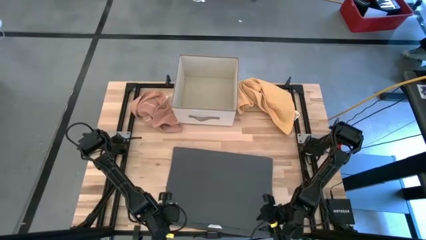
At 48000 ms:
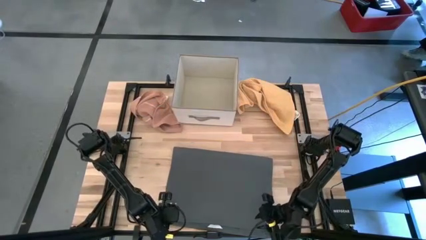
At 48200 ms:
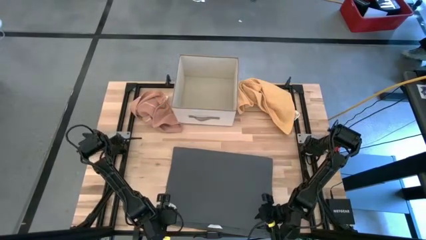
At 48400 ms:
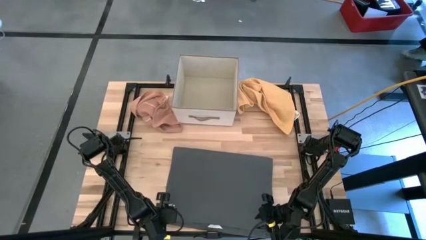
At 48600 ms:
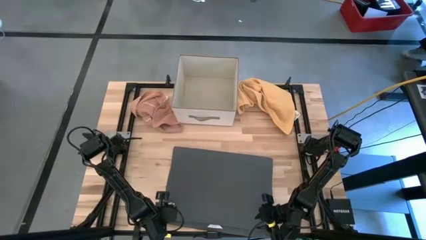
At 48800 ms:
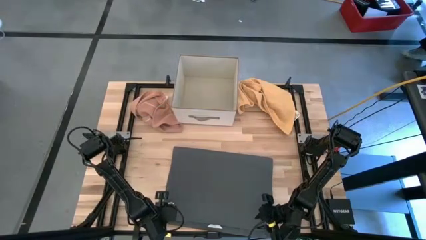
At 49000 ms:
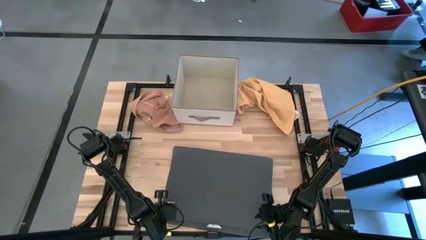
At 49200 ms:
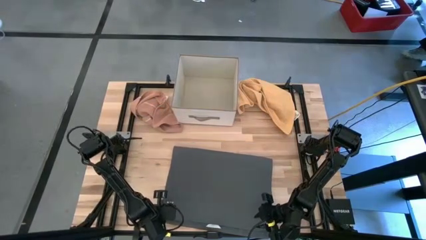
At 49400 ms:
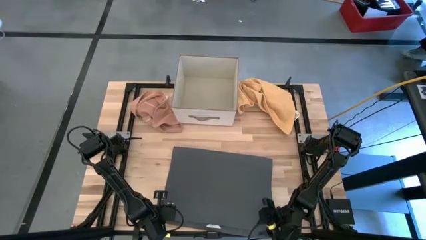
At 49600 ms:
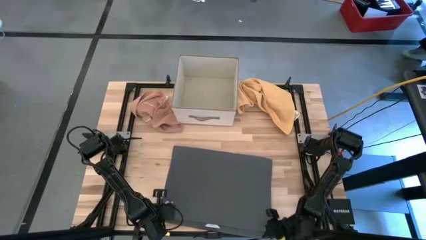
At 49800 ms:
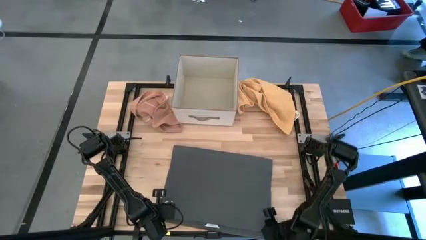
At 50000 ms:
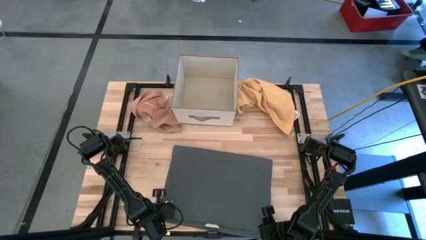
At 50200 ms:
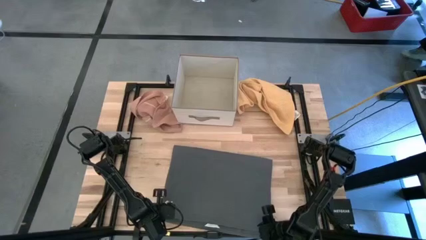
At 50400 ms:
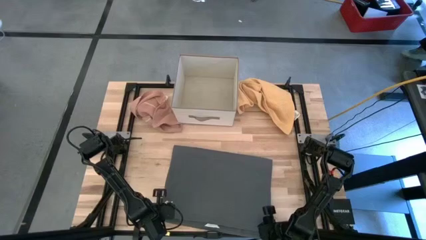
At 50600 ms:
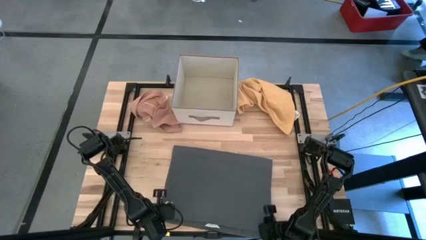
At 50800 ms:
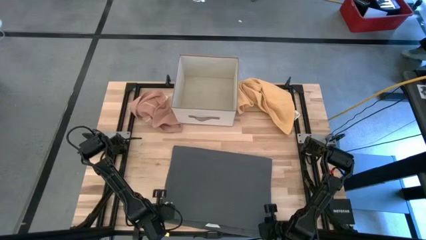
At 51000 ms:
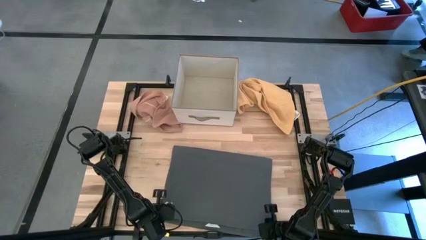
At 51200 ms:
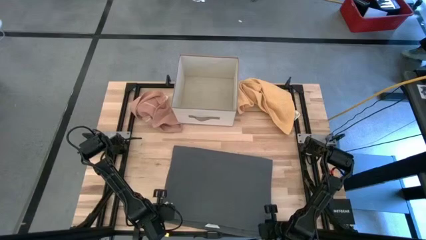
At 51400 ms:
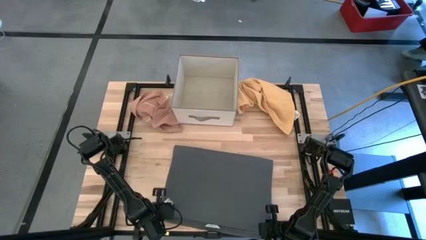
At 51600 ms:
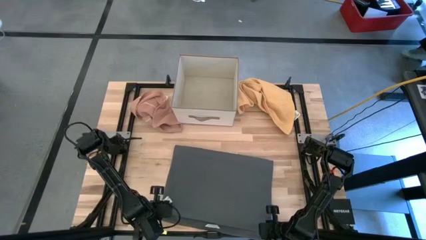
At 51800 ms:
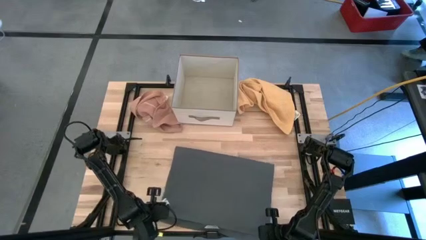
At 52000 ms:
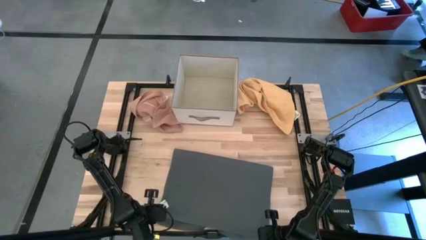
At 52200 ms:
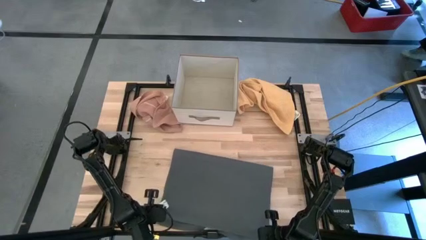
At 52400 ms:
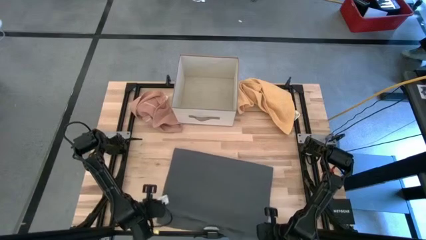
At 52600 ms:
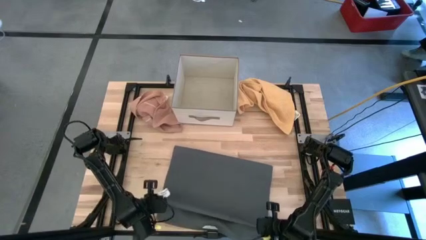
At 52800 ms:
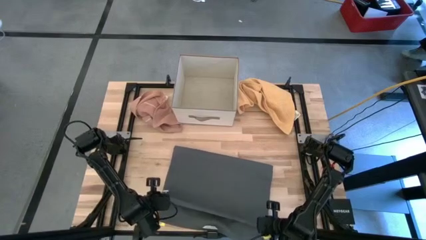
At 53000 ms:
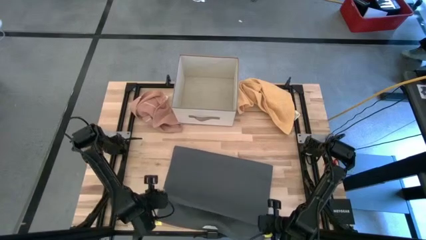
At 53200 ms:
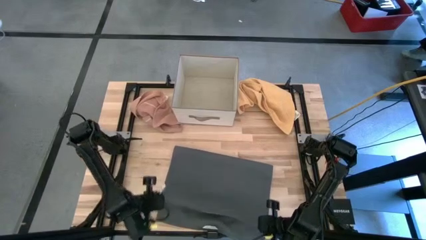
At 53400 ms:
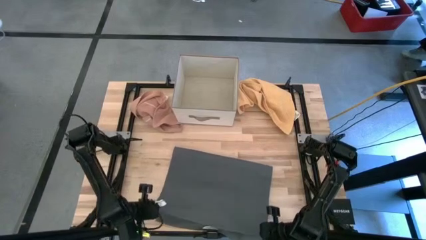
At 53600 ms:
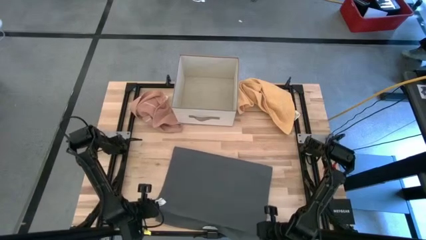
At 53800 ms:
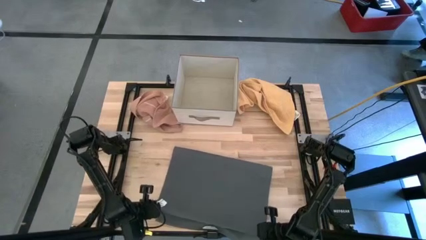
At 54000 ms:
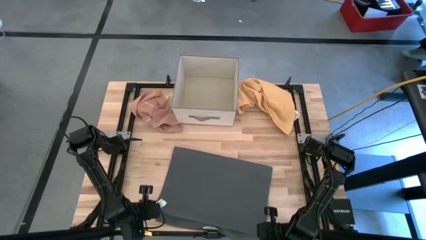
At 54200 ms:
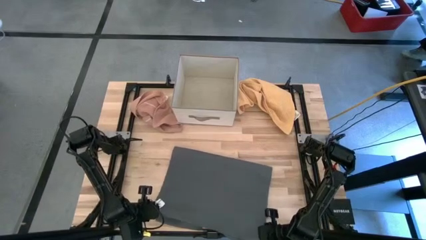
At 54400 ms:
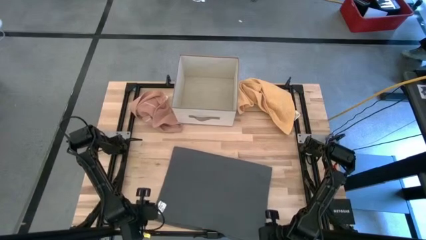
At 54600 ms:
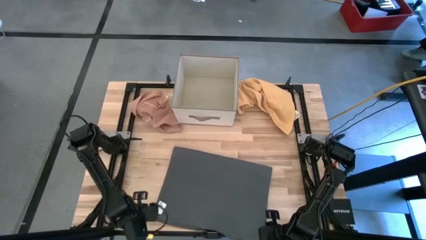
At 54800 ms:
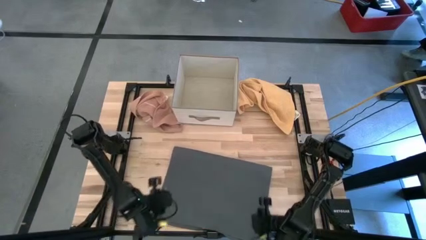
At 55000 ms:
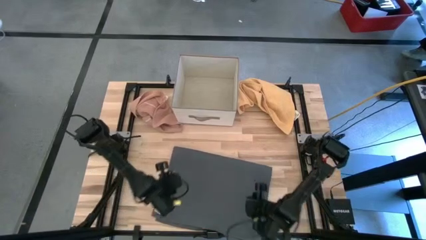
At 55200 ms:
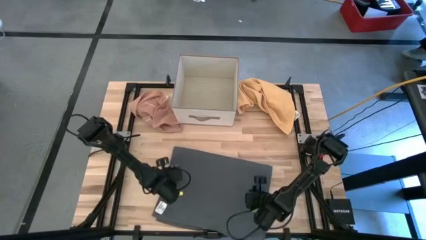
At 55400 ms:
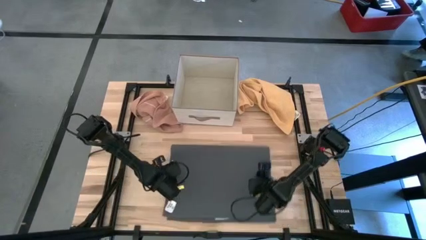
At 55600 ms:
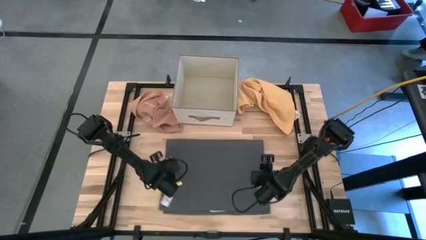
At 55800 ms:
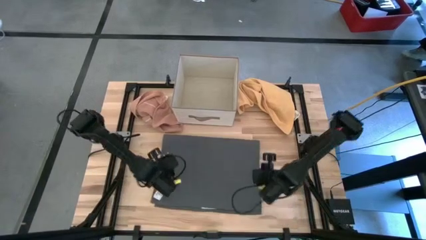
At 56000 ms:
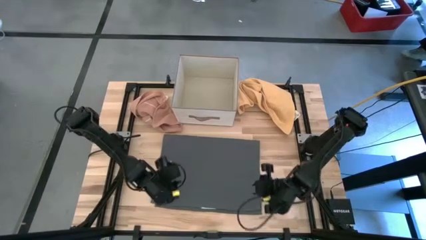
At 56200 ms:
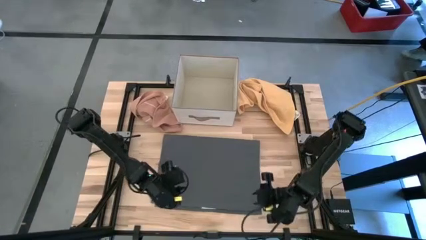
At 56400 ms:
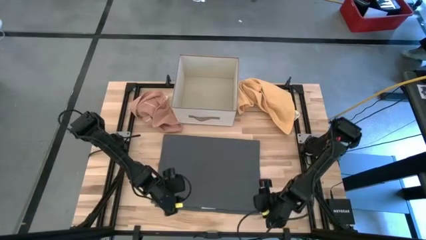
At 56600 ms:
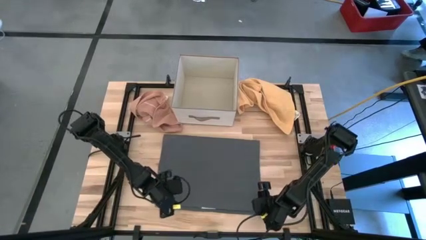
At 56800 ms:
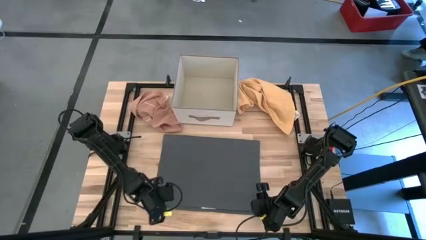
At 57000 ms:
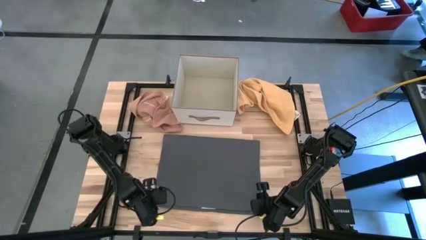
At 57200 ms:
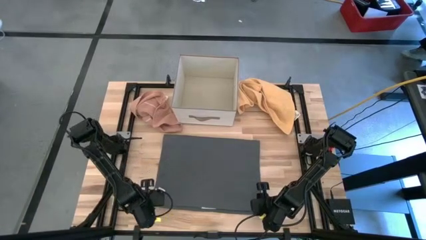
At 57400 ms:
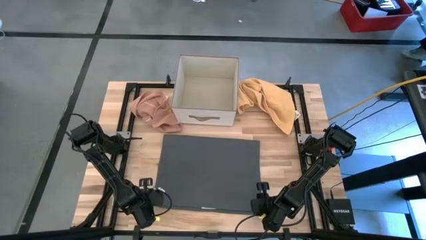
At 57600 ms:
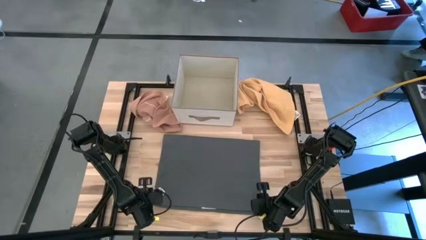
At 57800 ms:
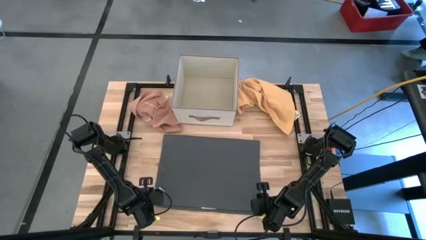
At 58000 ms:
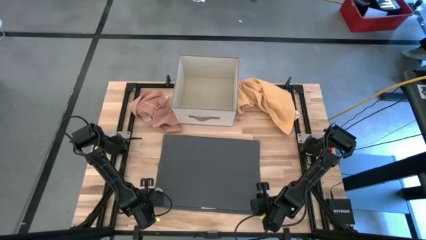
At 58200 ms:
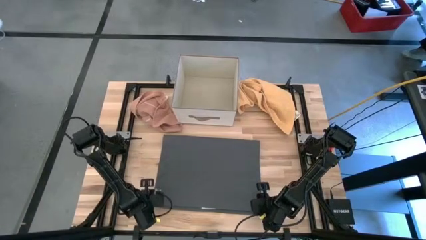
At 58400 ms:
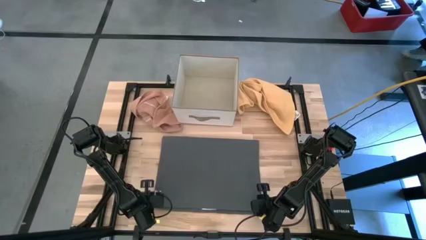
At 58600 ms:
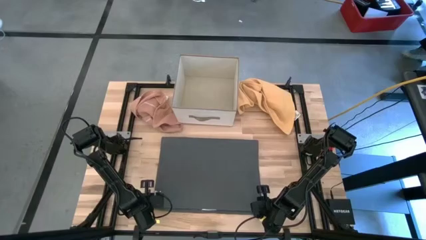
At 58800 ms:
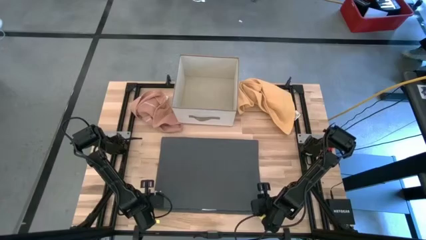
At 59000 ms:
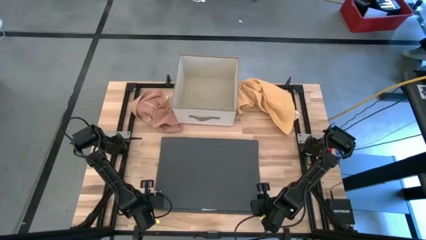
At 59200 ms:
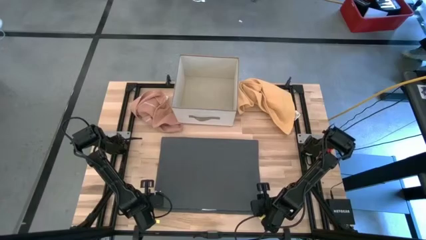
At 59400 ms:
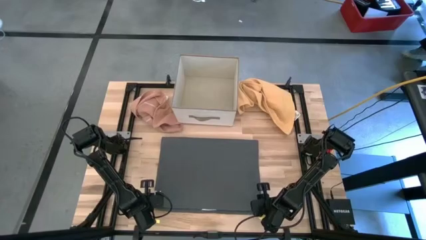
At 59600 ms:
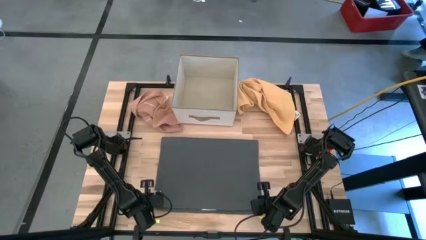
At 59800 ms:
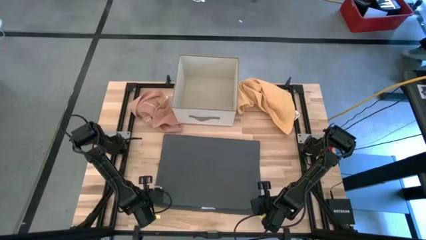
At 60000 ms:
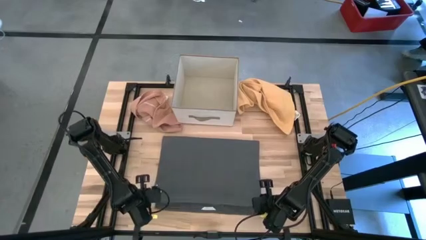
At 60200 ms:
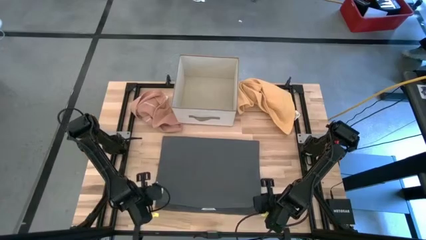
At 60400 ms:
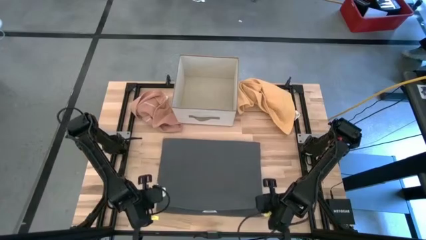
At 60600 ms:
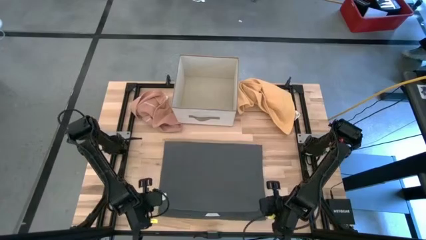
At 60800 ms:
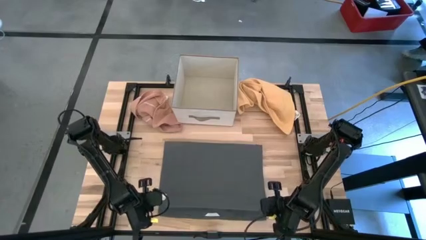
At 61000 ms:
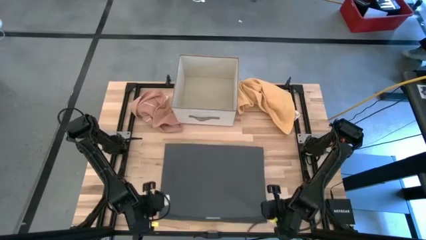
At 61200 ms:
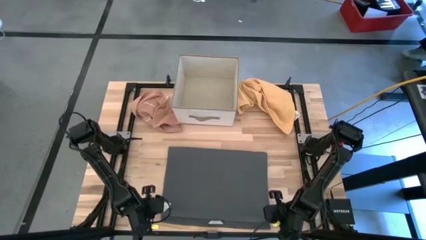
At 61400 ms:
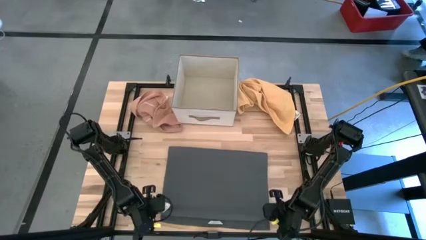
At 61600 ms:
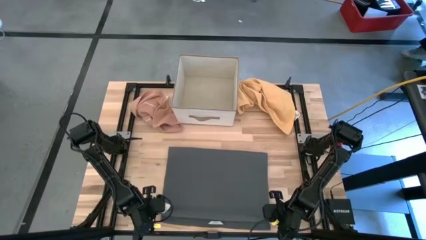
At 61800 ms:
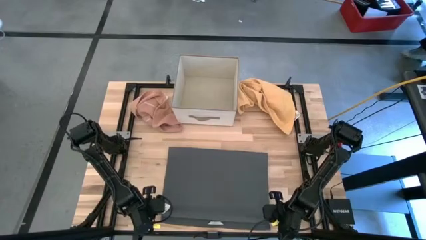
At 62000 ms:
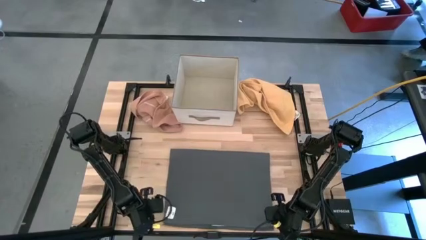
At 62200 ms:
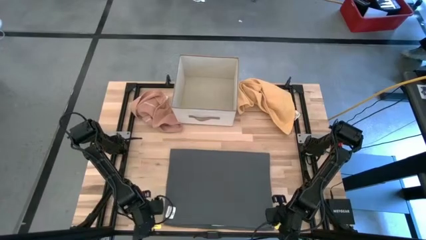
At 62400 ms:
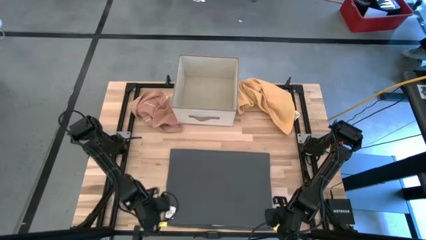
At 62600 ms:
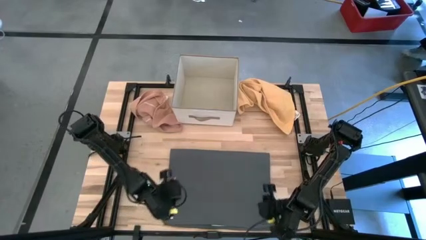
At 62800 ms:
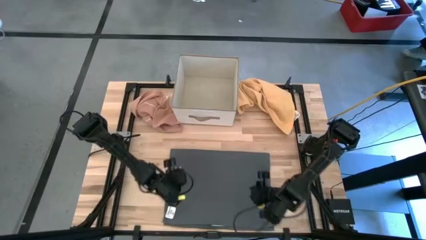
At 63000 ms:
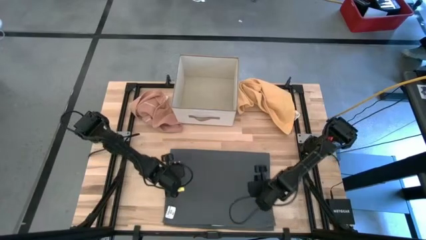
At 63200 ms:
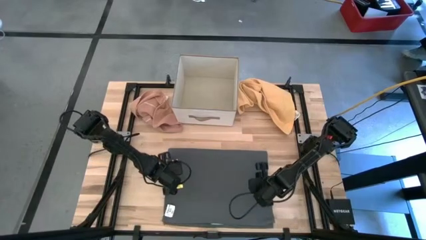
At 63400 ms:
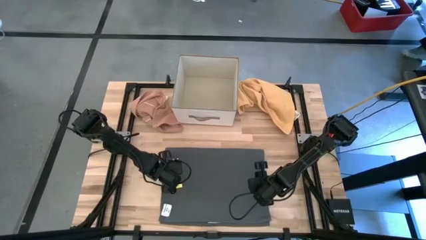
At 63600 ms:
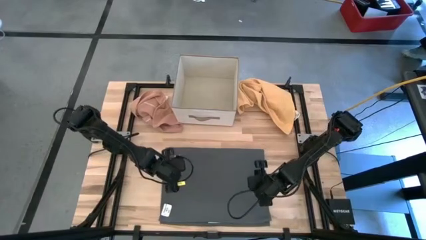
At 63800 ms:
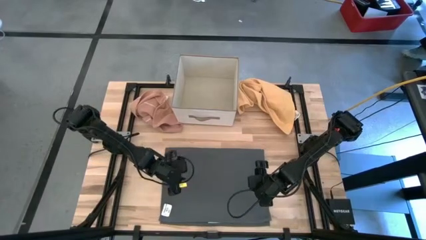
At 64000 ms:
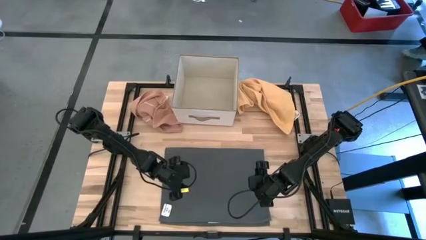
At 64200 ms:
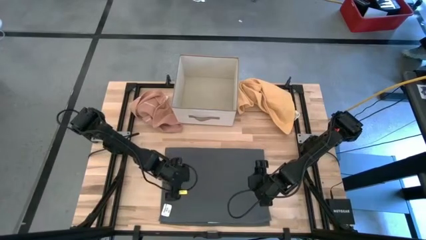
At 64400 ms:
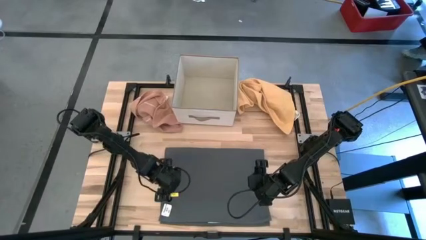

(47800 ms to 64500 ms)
Task: Fold towel
Fold the dark gray towel
